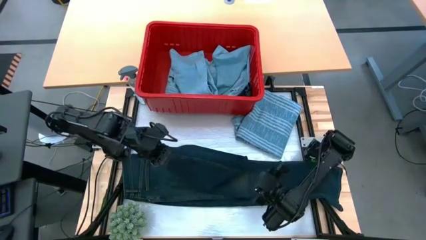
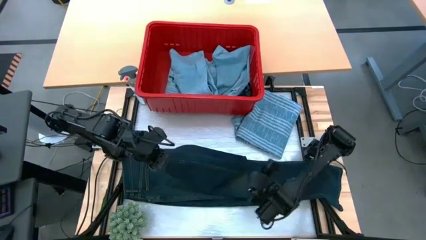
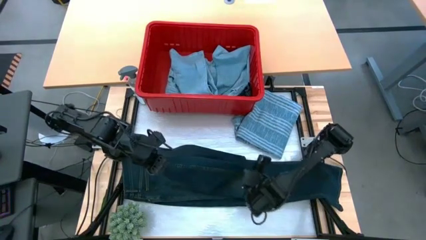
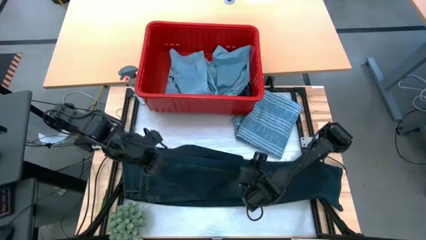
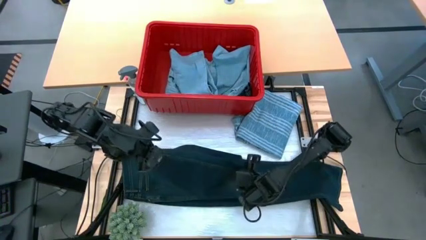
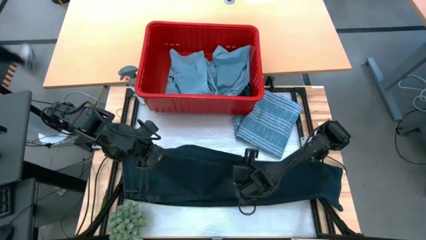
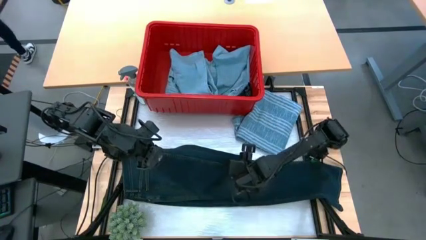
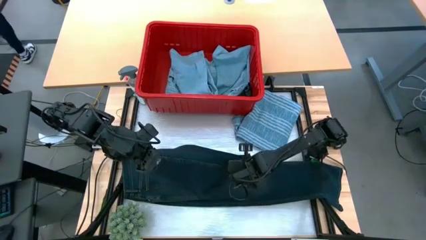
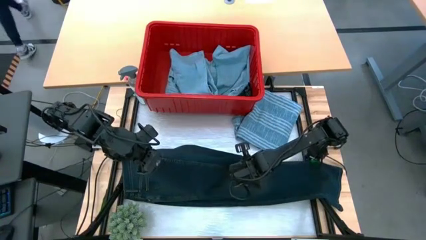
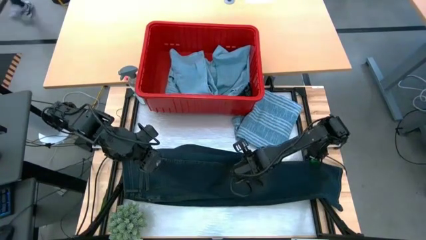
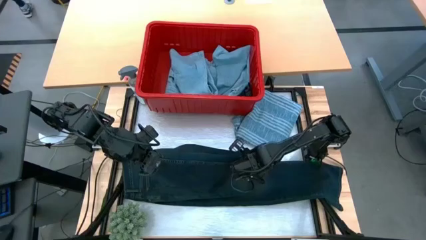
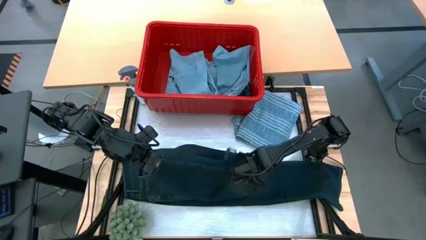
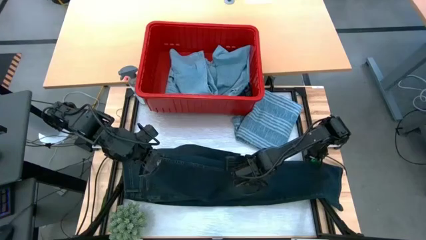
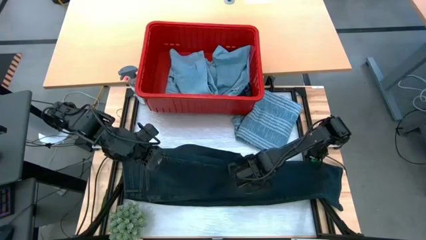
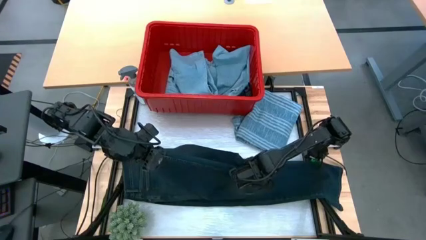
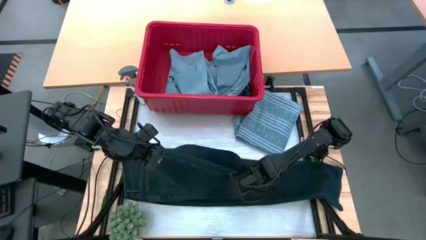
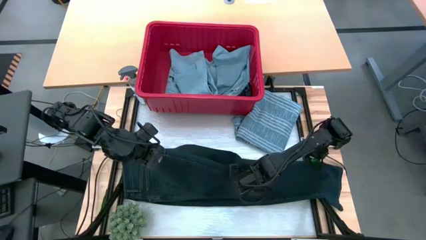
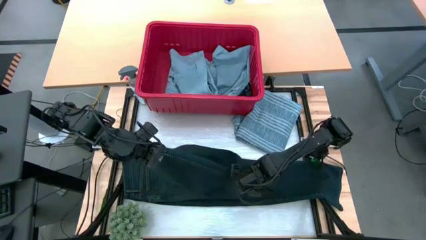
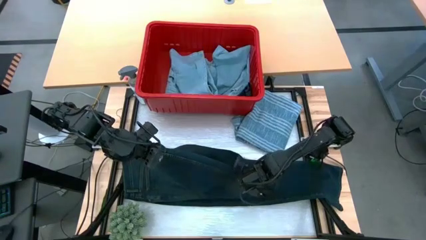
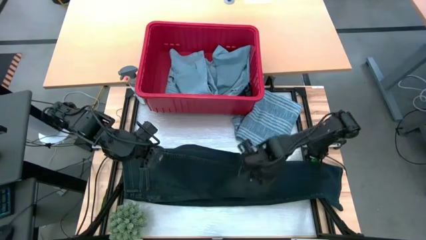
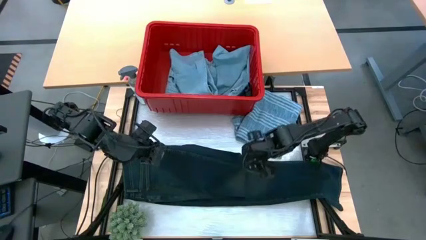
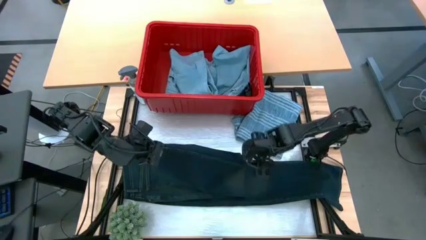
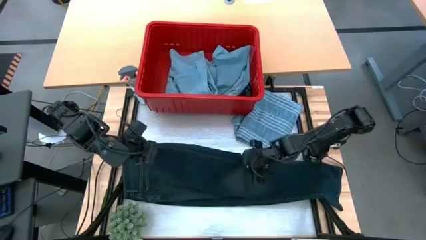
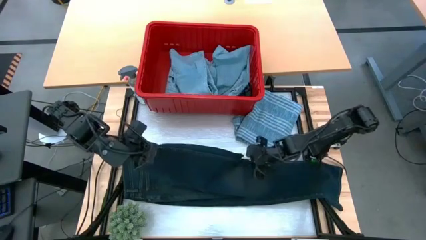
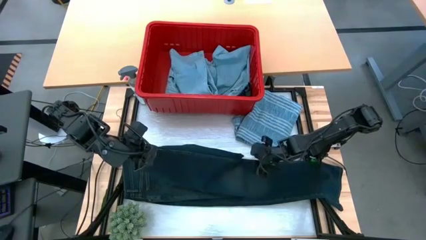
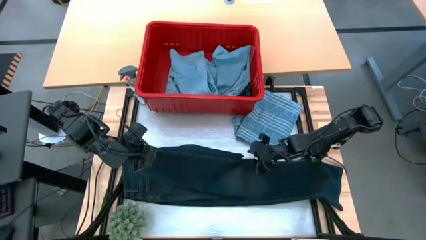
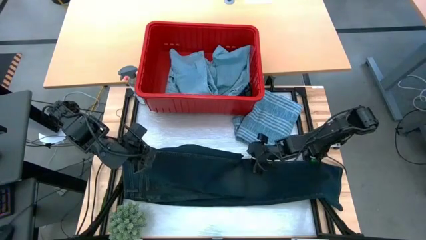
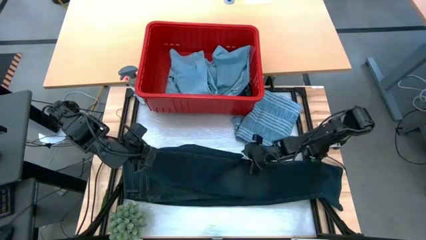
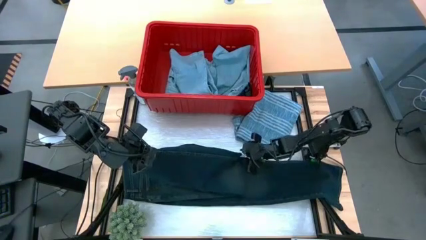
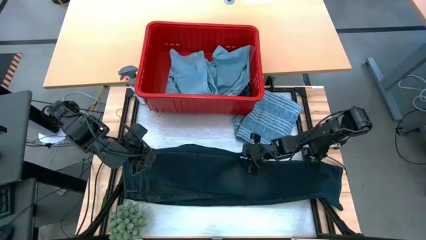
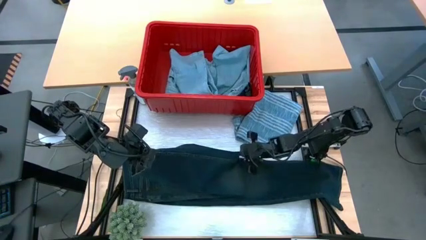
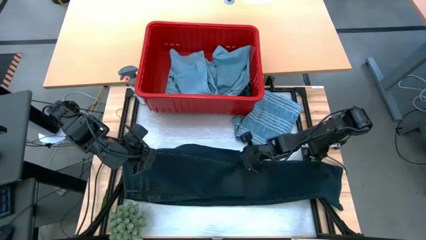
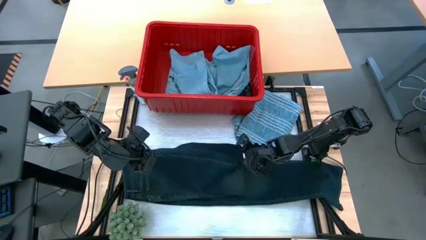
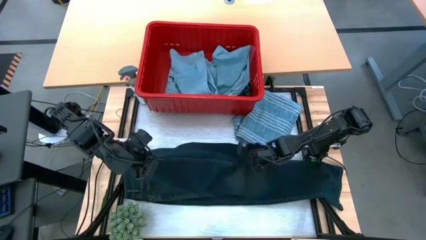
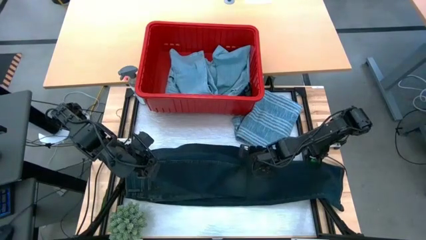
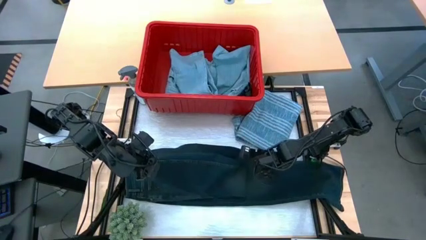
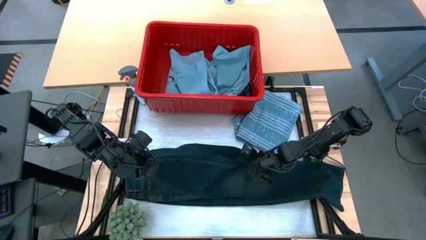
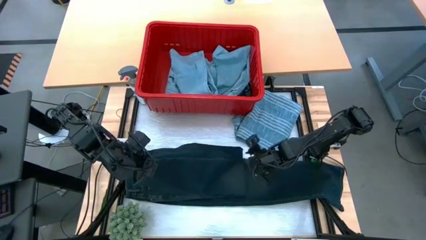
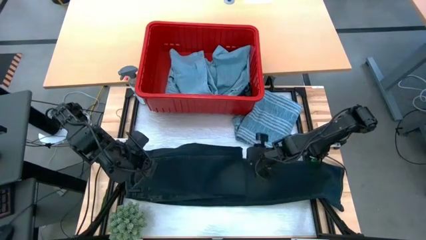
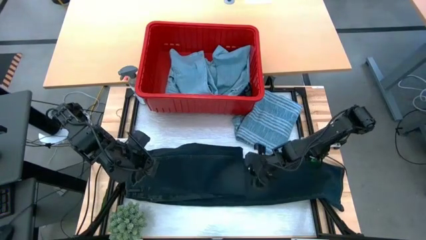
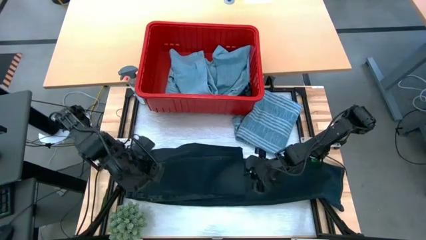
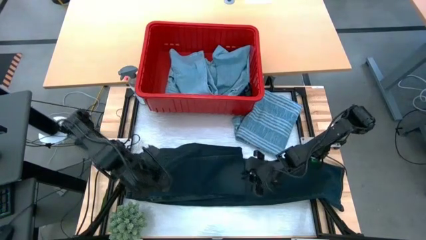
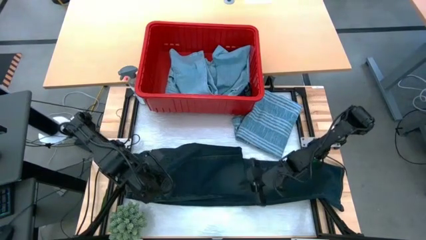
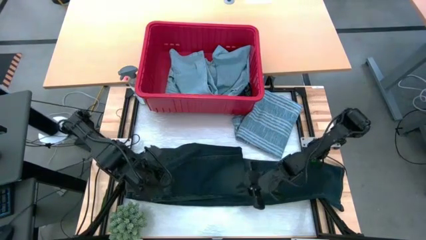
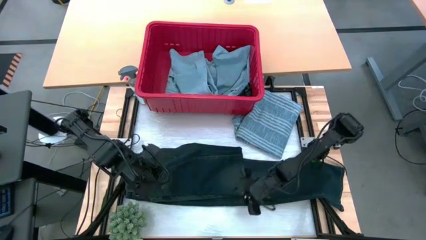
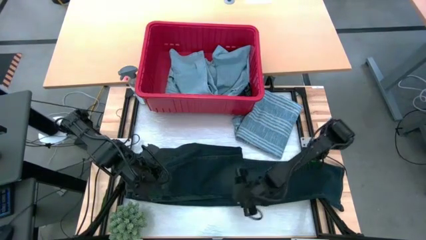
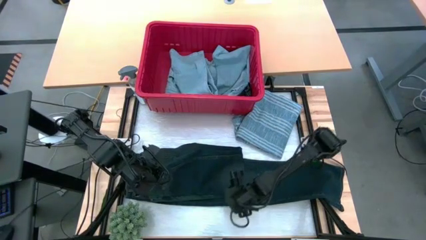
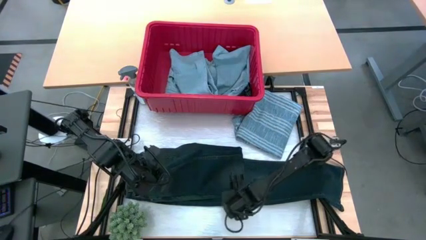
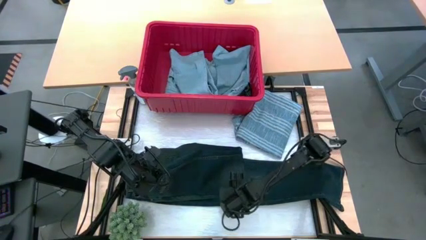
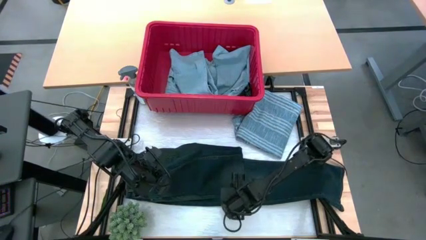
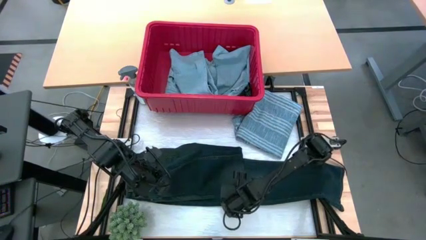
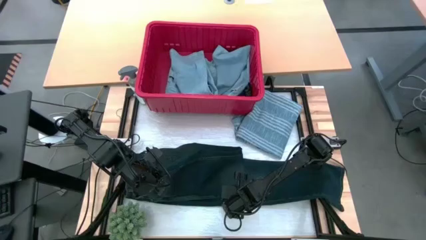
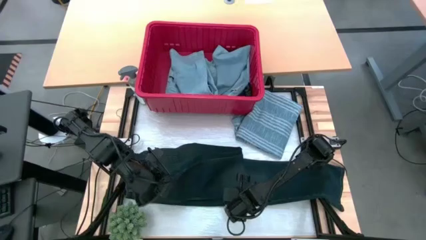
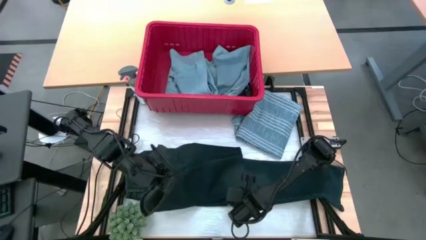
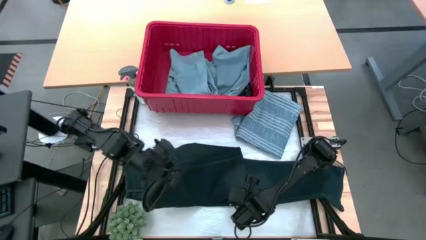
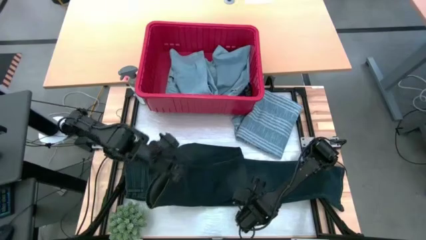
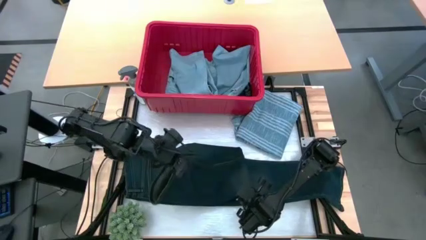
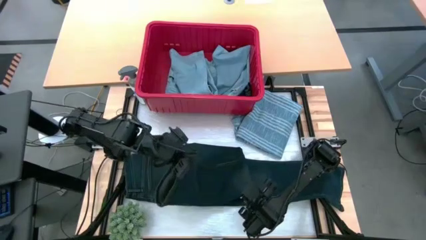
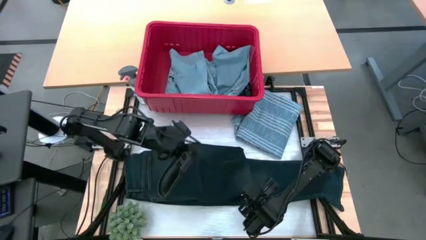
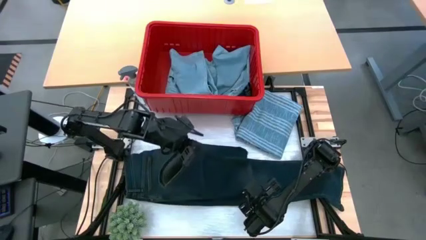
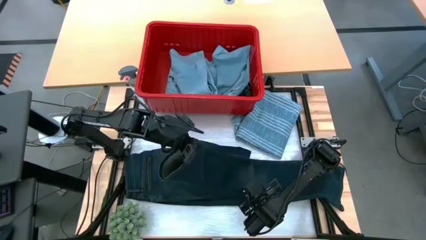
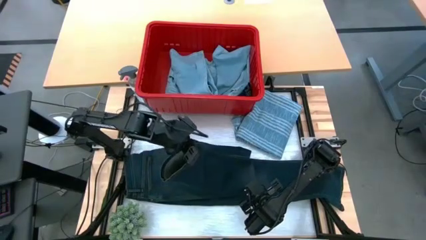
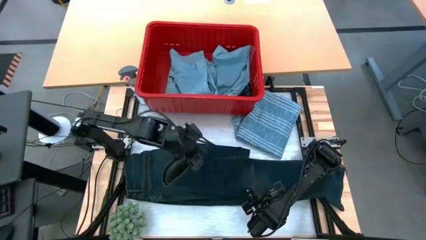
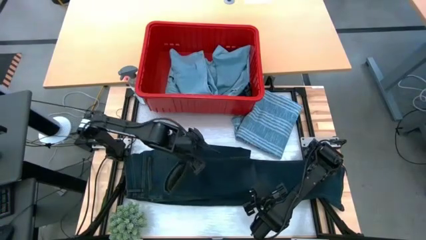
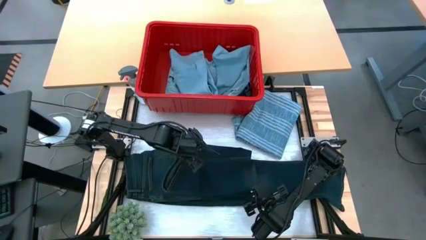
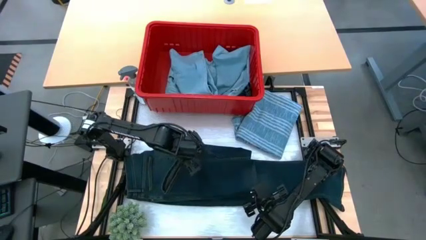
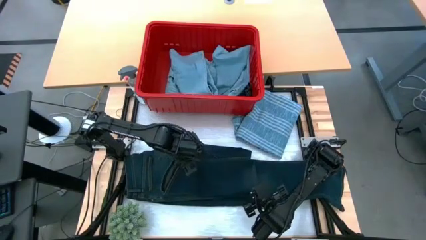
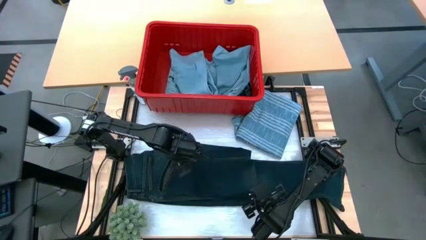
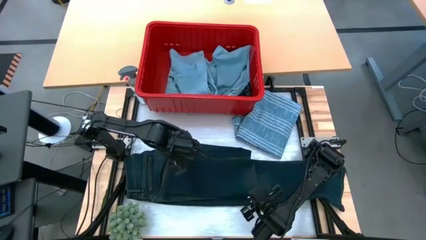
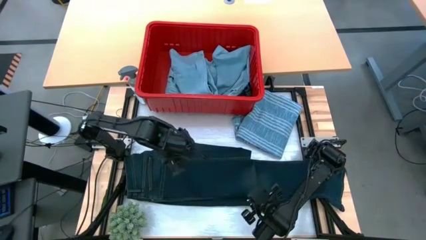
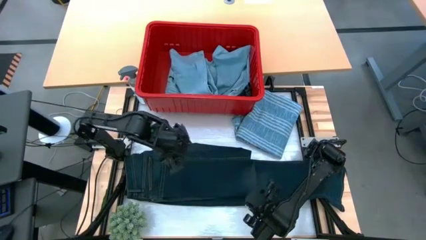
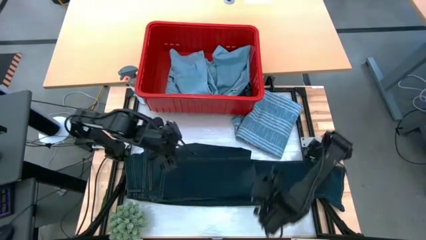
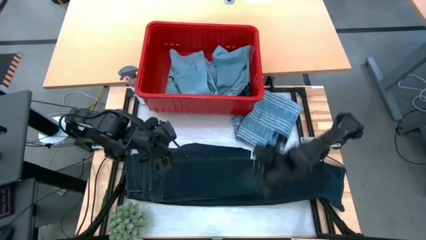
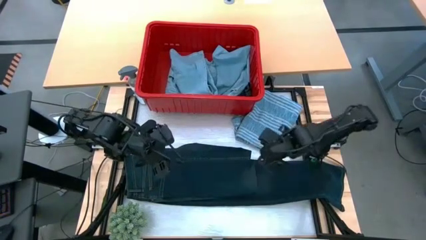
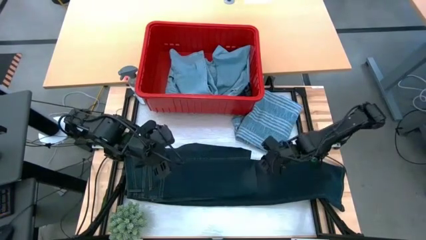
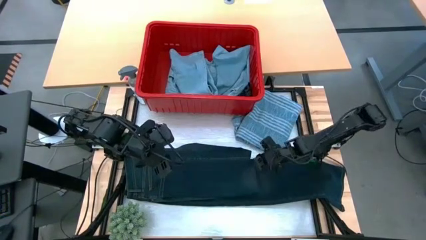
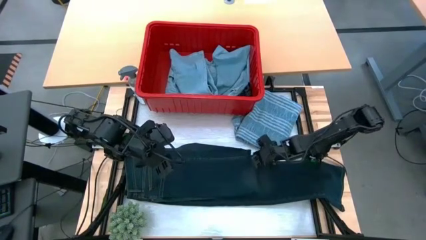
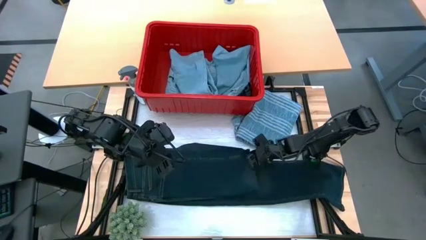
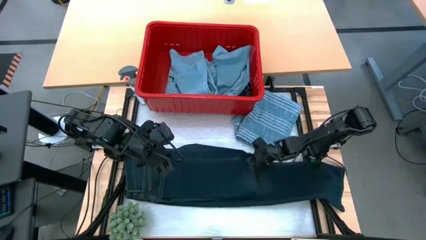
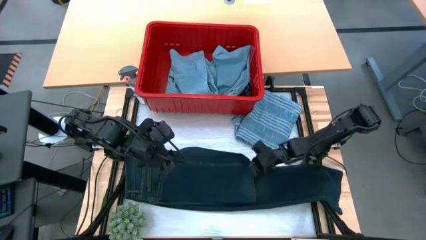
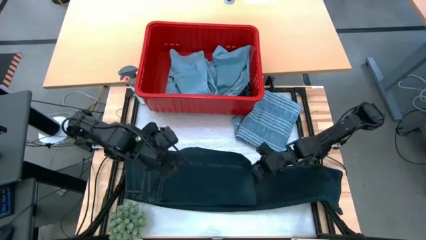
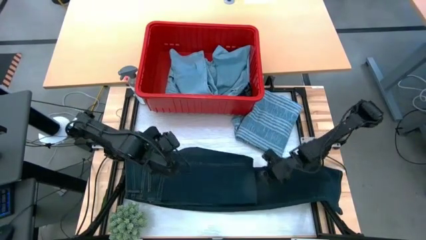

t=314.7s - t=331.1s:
Task: Fold Laundry from Bin
Fold the black pants
